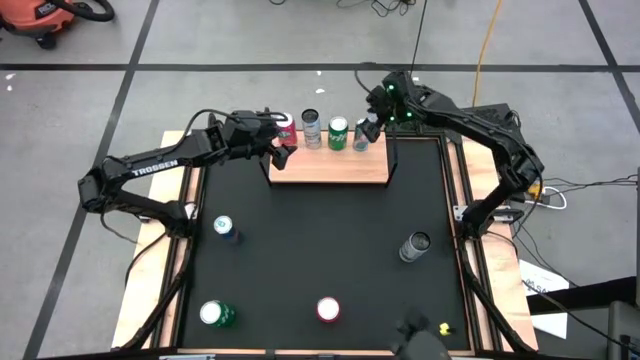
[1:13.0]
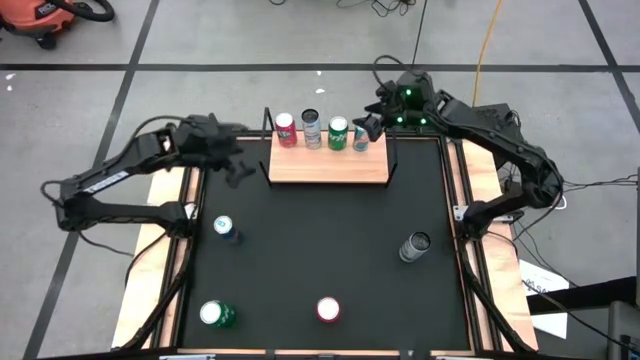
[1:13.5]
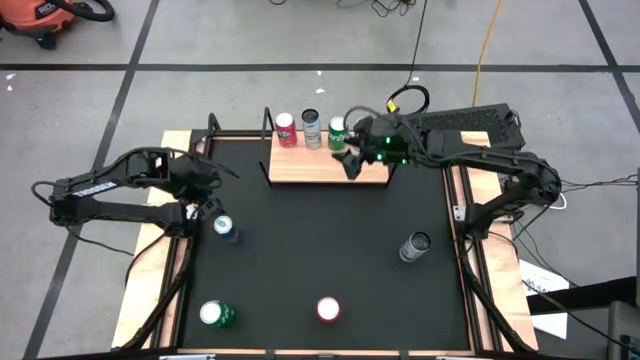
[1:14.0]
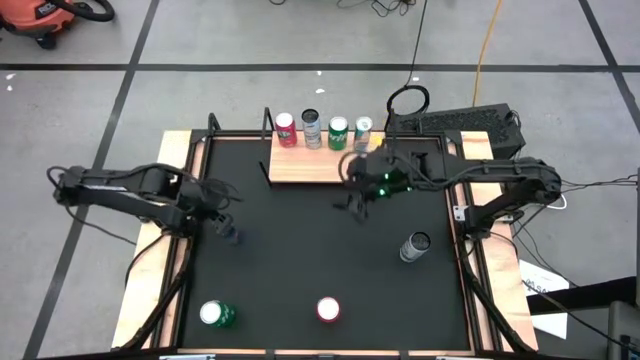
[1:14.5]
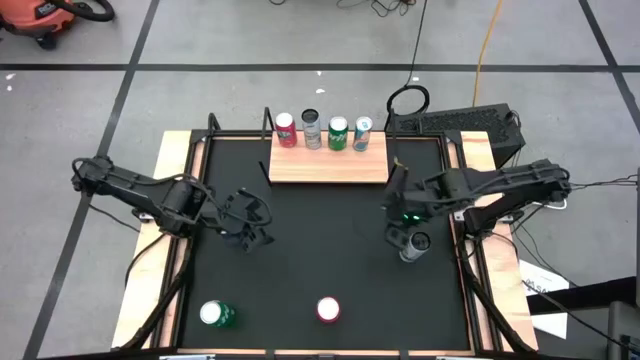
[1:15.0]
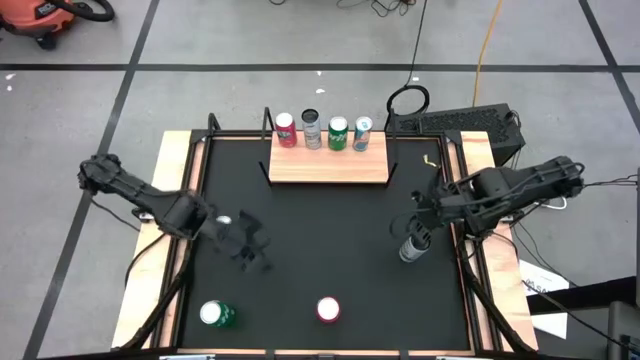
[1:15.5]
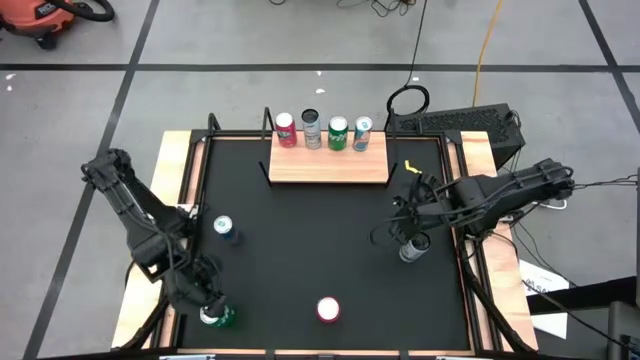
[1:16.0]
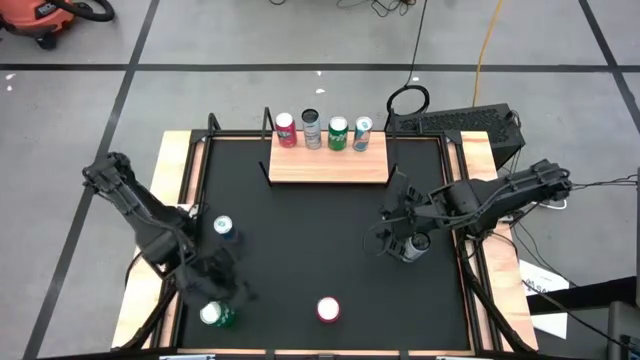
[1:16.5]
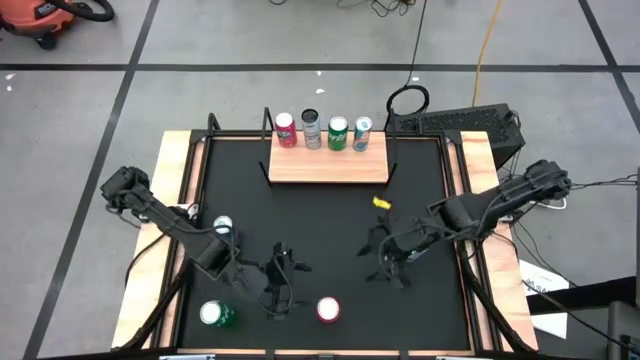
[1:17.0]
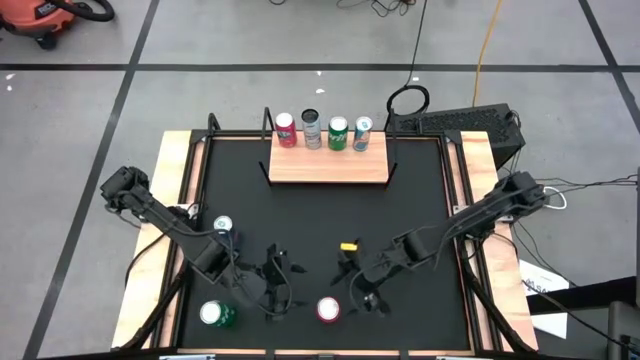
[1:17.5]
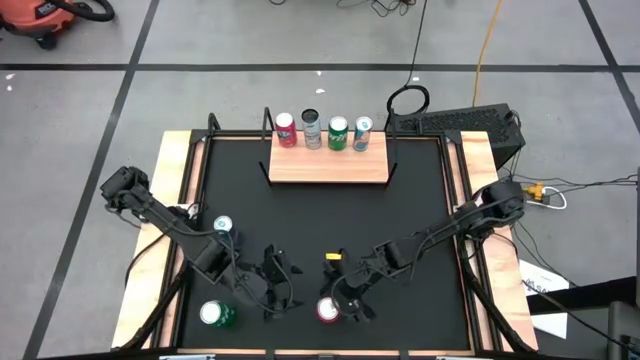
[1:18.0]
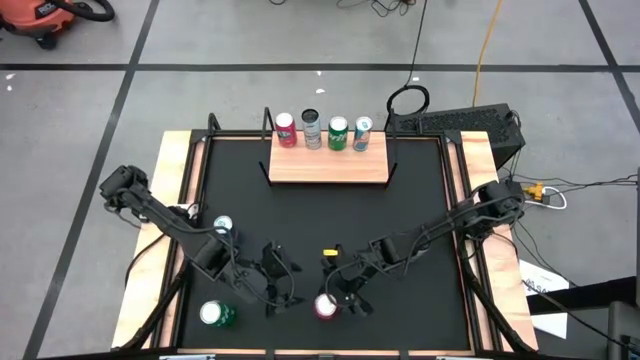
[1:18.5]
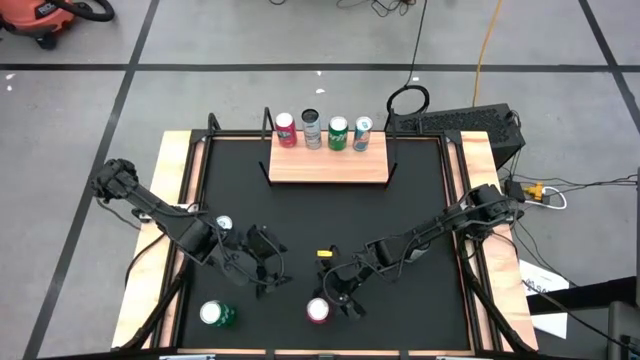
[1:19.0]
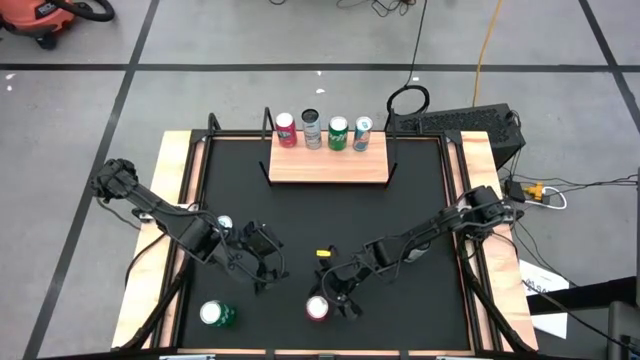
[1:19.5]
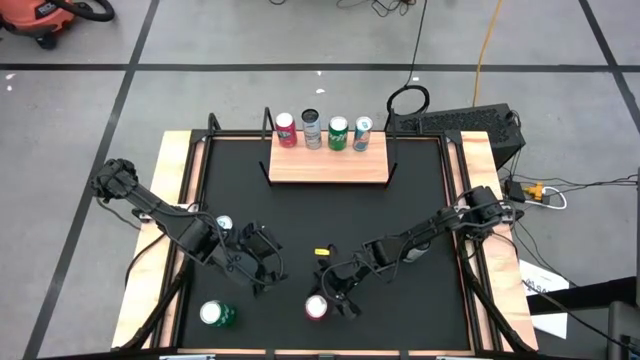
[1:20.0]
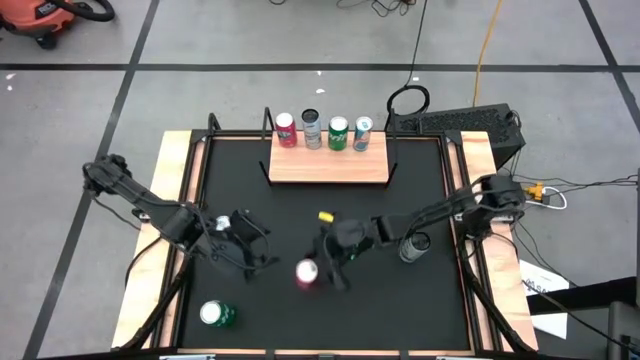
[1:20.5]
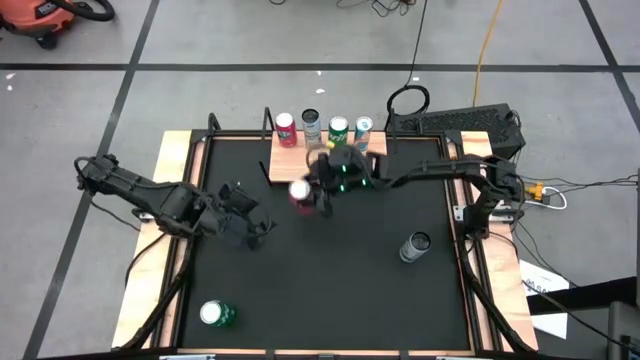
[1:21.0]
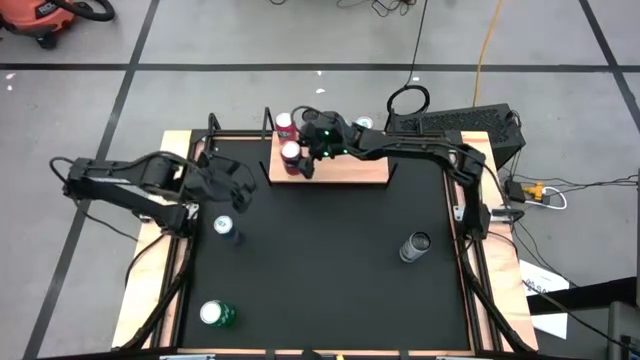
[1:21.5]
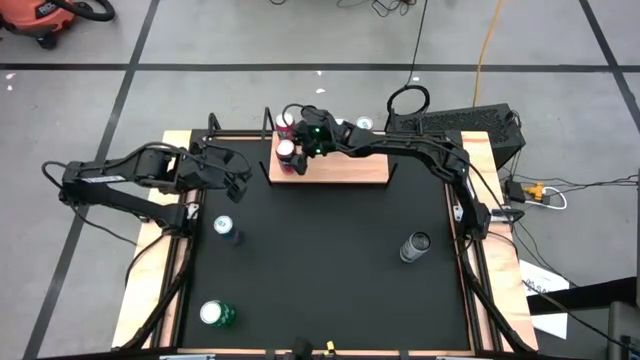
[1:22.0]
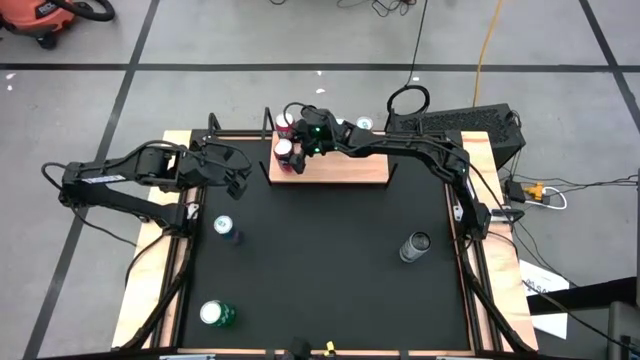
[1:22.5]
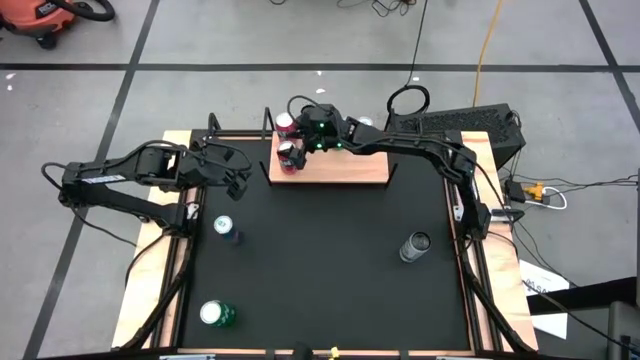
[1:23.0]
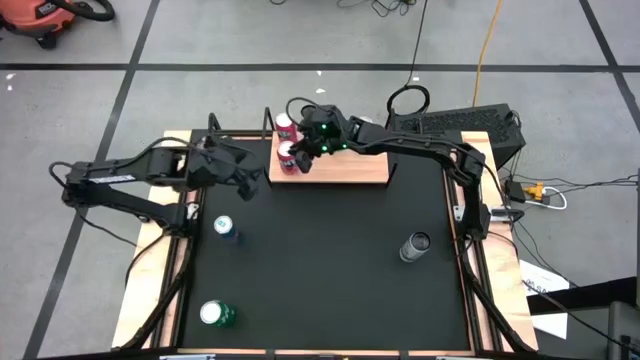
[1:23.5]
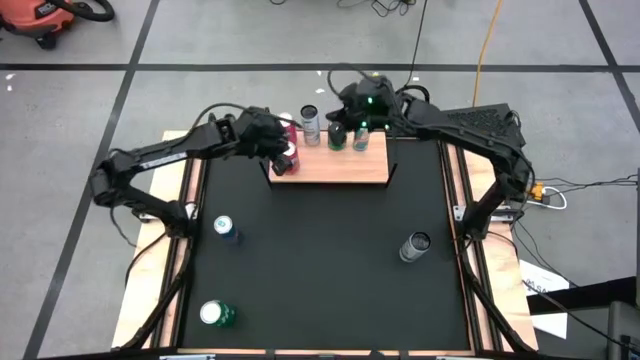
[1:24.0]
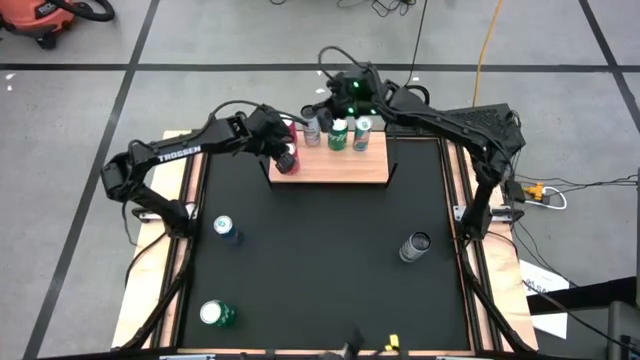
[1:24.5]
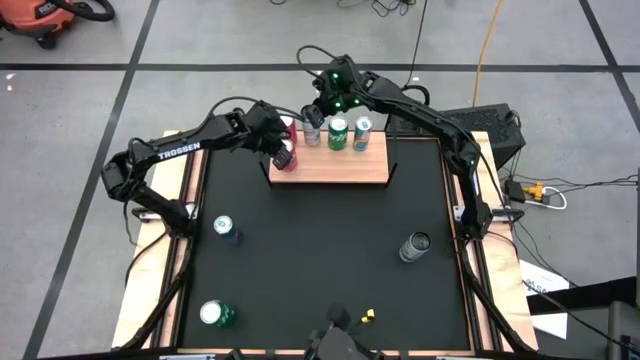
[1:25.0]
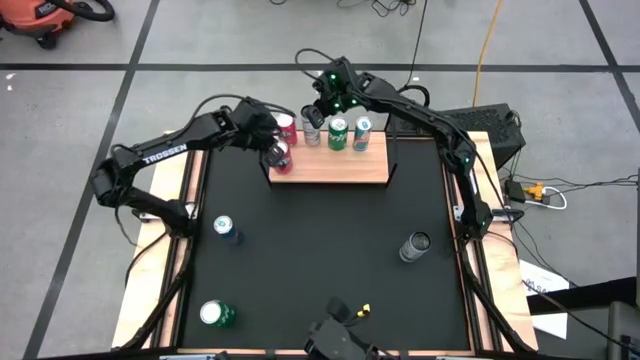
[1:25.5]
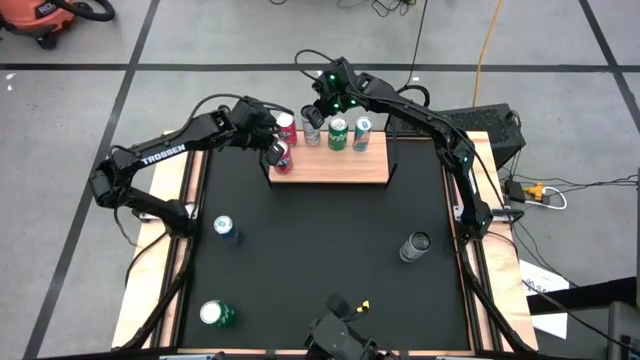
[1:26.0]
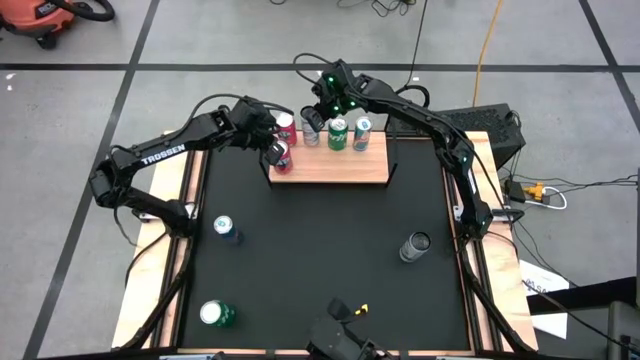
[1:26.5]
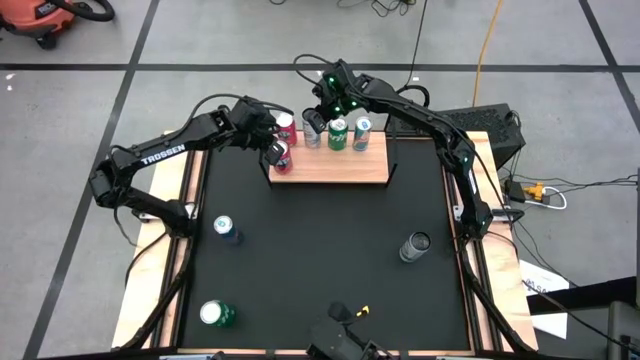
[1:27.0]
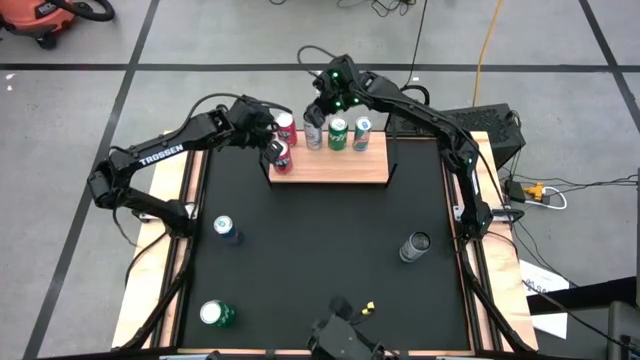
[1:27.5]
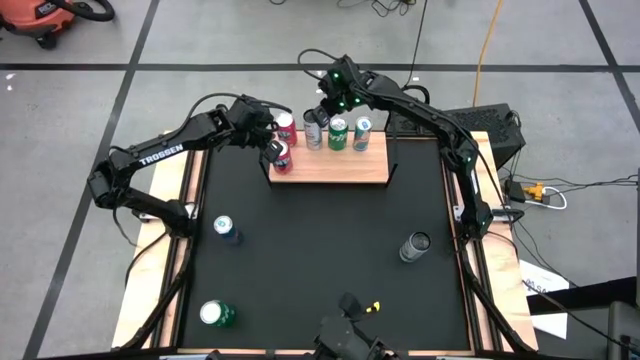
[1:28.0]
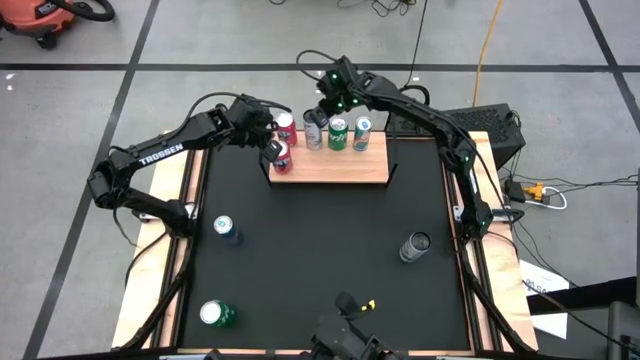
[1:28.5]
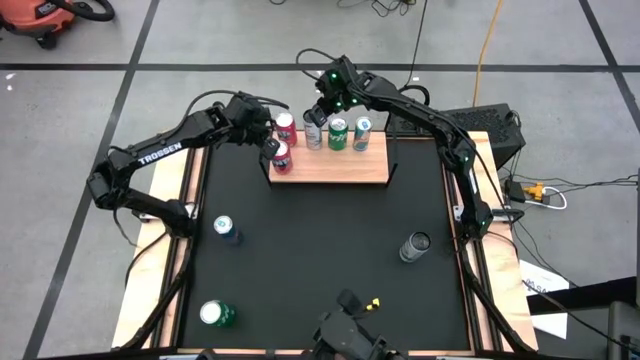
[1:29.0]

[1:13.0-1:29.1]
Task: Place canned beverage on shelf
Put the red soda can on the shelf aligned with the other red soda can

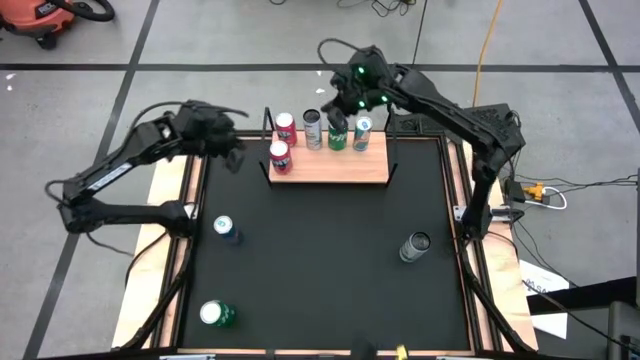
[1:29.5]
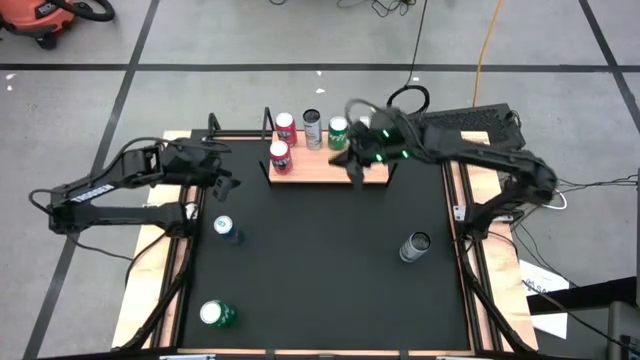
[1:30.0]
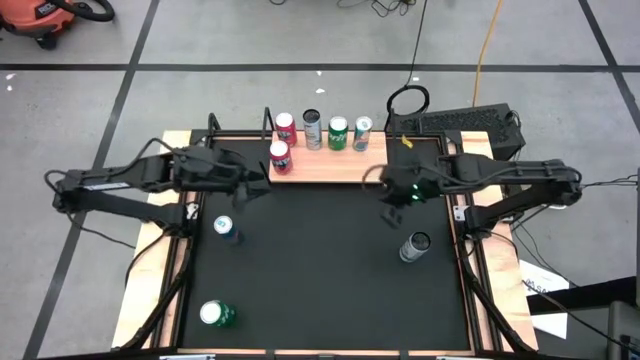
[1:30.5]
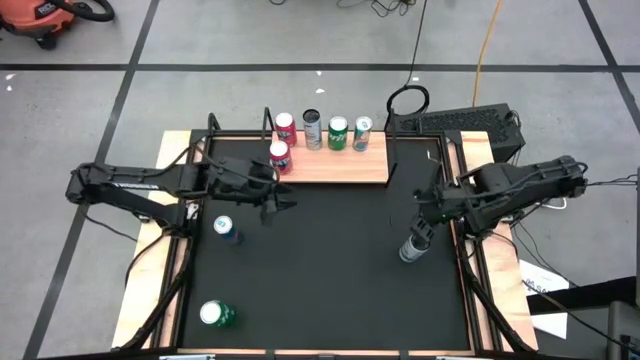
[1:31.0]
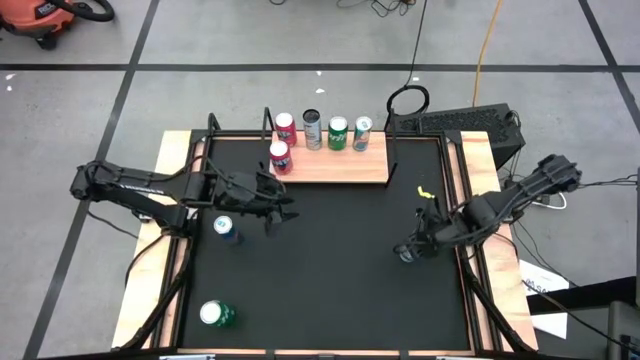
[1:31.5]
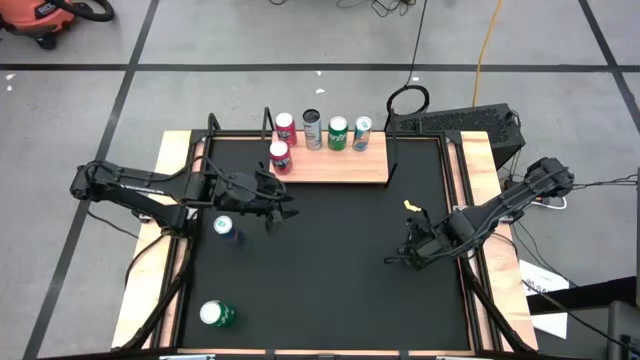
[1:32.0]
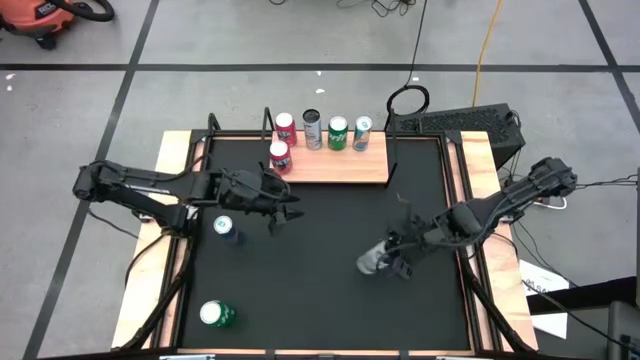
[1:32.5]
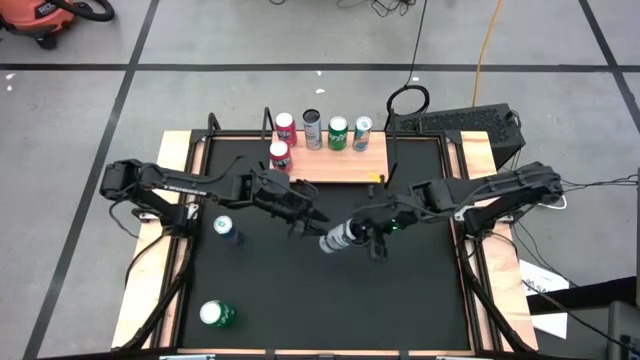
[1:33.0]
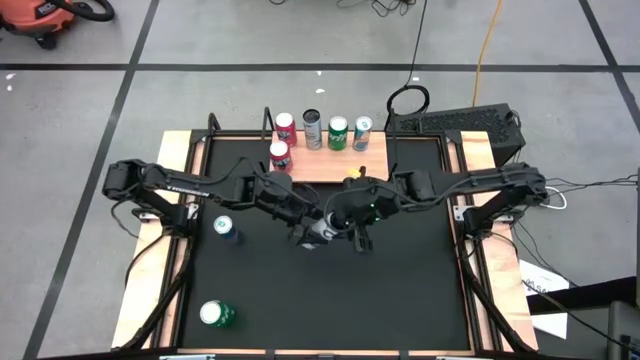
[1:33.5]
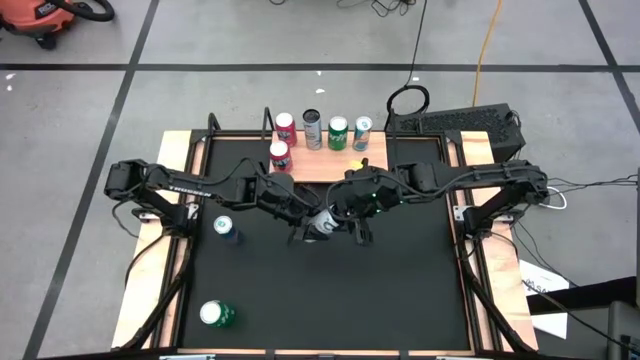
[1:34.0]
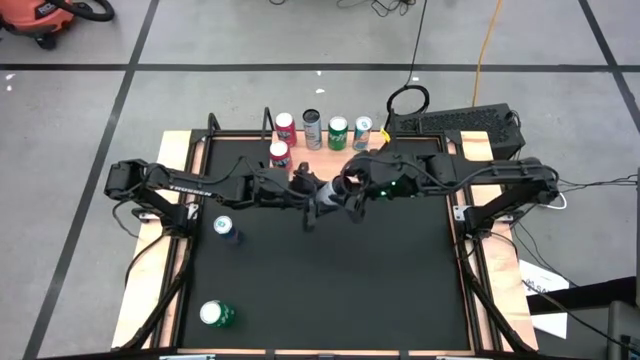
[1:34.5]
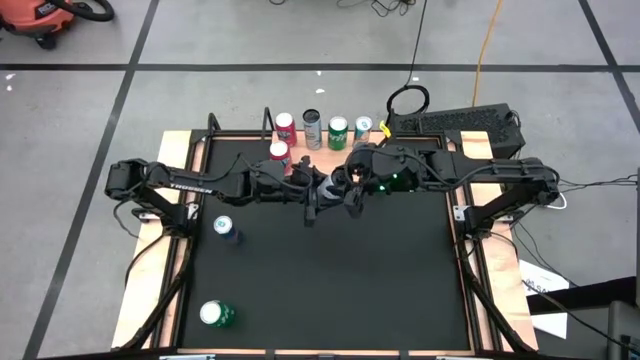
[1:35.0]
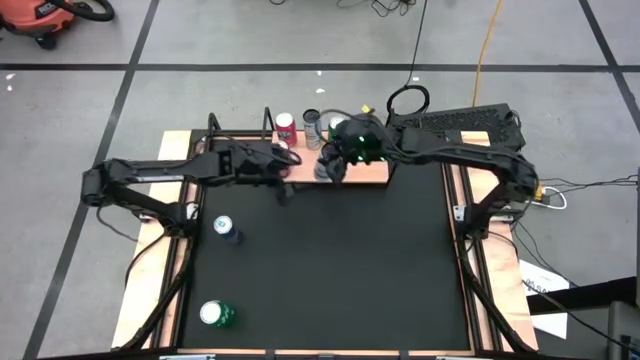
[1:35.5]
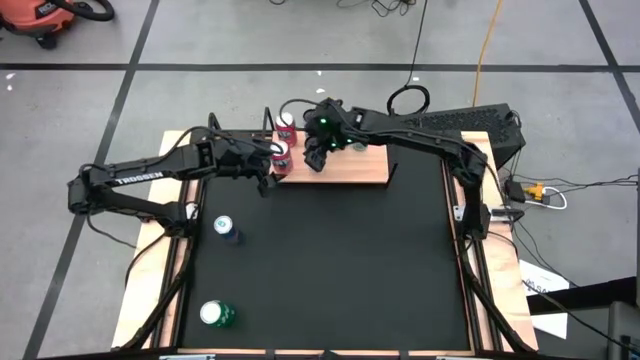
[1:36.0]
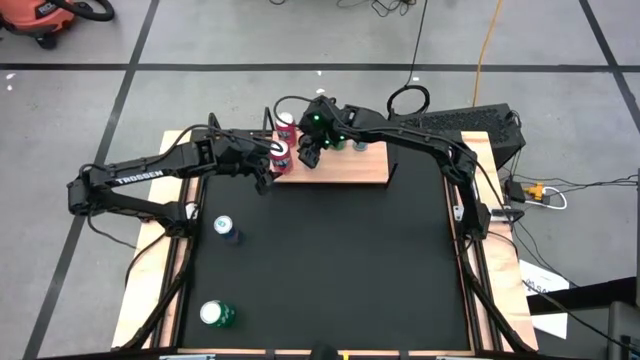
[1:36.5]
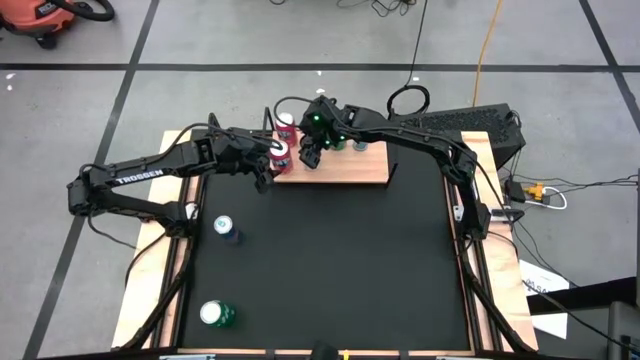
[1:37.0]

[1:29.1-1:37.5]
Put the white-blue soda can on the shelf aligned with the other white-blue soda can
